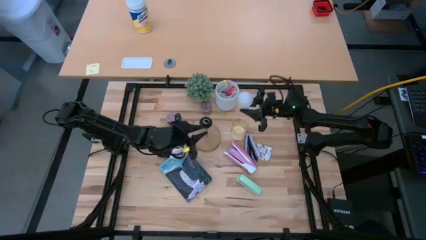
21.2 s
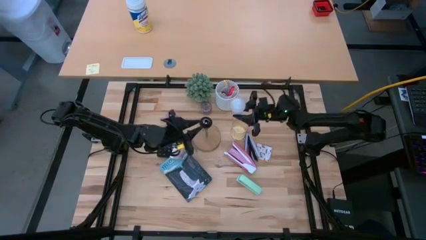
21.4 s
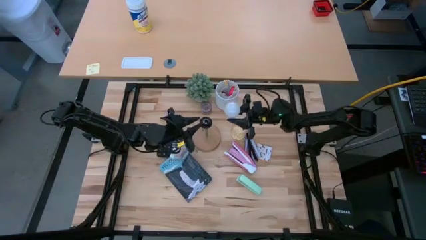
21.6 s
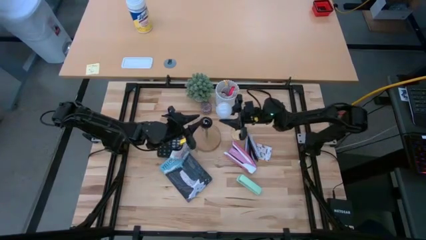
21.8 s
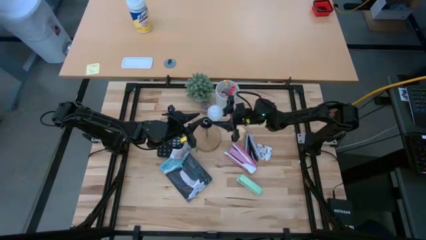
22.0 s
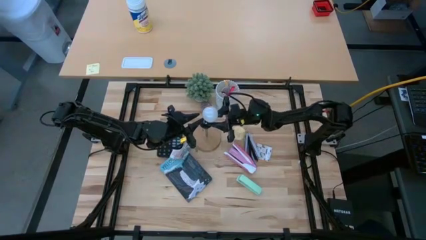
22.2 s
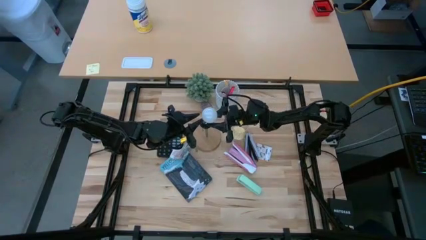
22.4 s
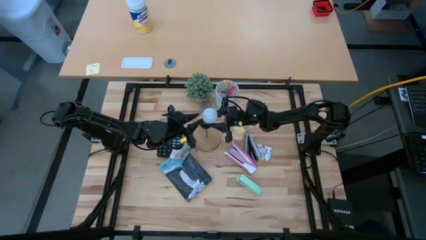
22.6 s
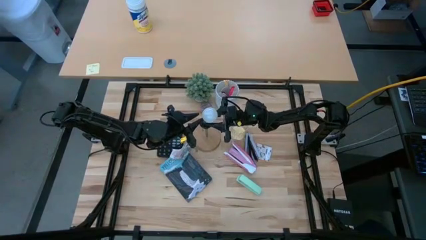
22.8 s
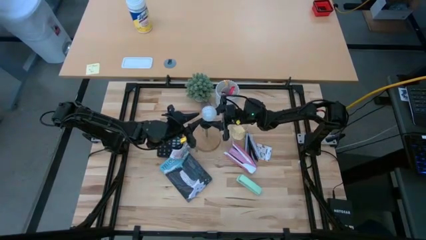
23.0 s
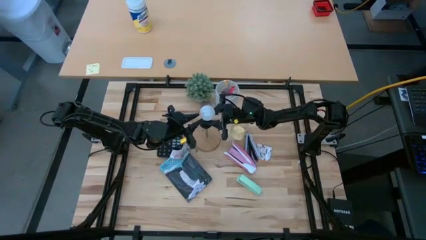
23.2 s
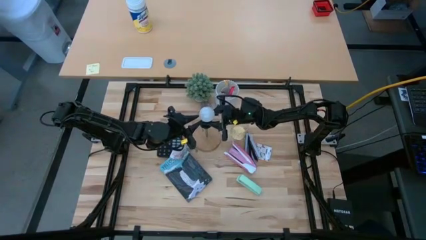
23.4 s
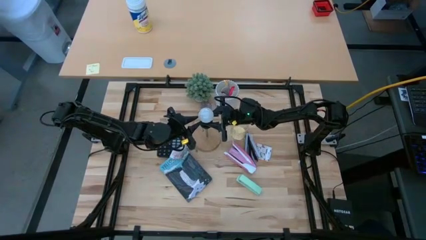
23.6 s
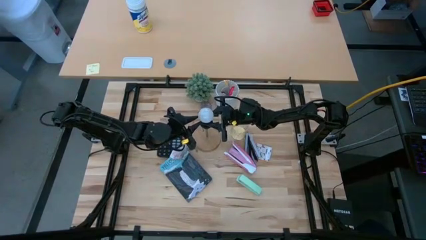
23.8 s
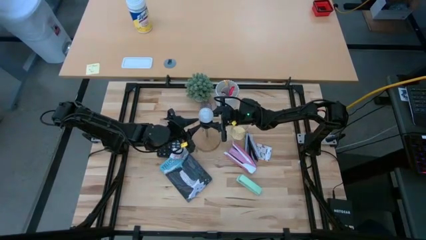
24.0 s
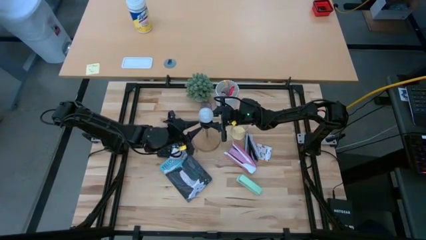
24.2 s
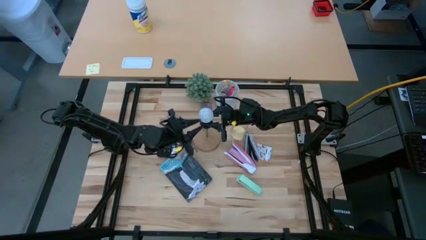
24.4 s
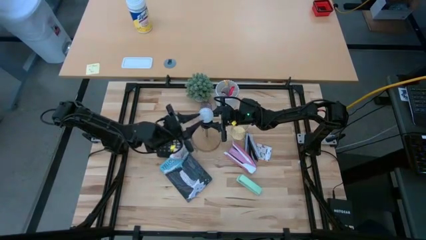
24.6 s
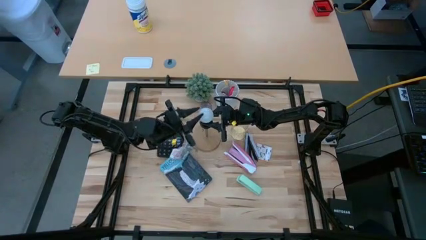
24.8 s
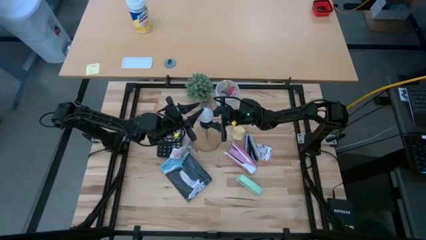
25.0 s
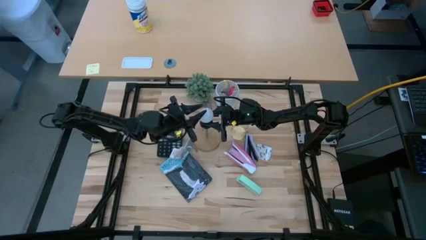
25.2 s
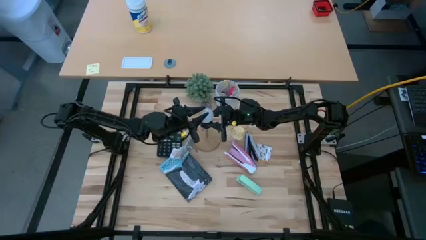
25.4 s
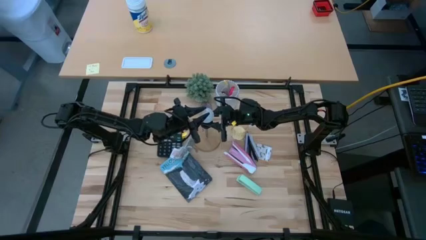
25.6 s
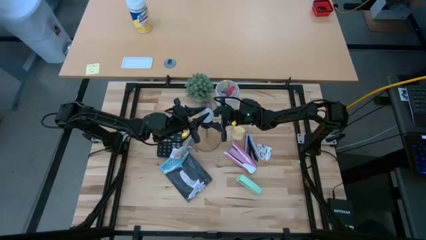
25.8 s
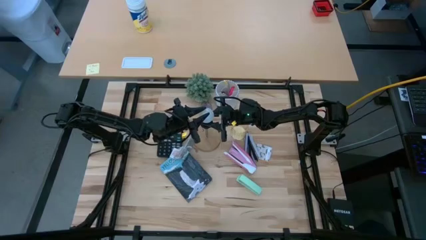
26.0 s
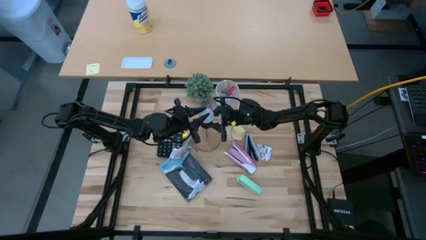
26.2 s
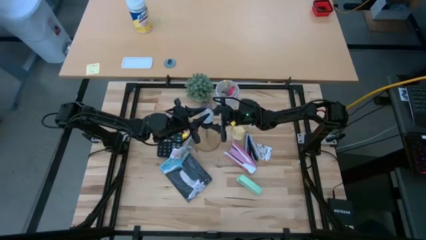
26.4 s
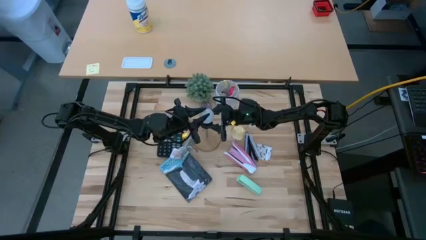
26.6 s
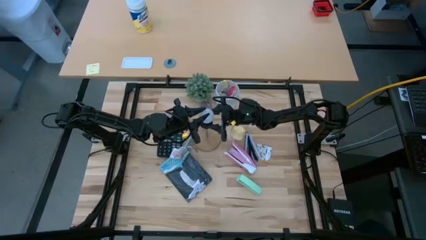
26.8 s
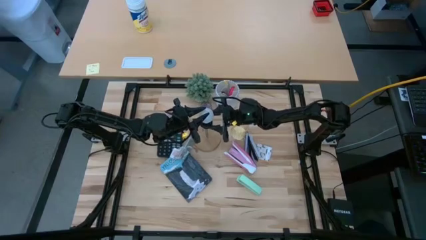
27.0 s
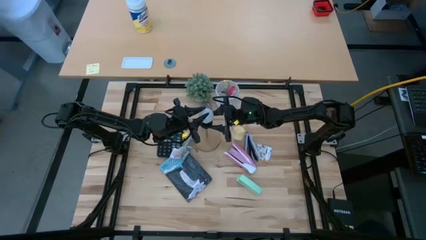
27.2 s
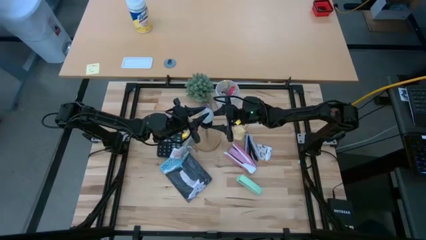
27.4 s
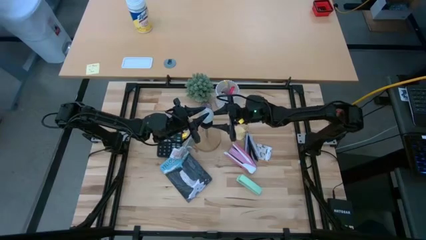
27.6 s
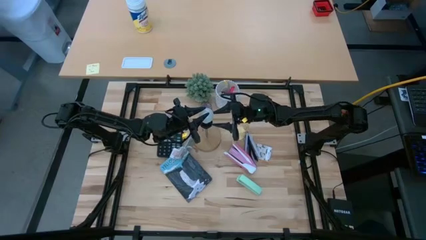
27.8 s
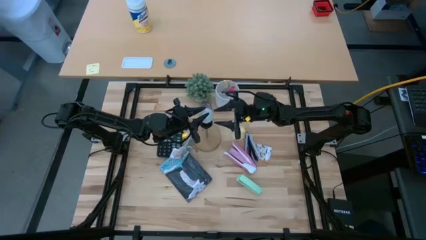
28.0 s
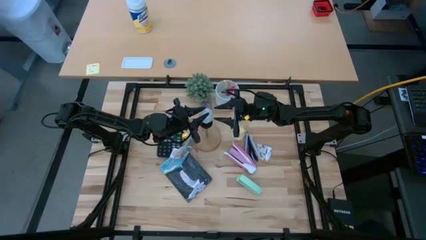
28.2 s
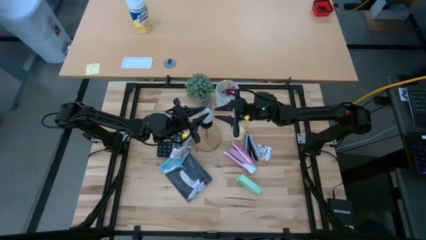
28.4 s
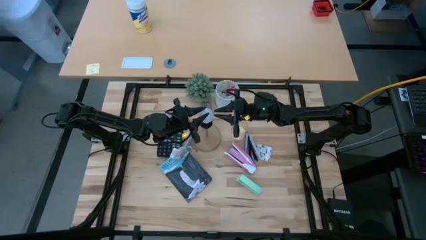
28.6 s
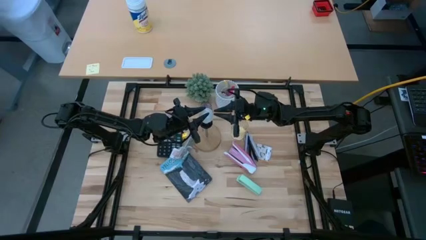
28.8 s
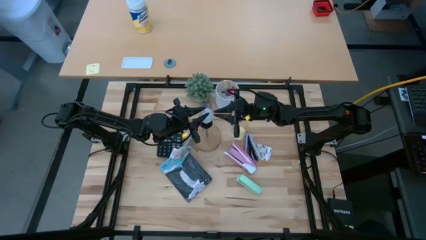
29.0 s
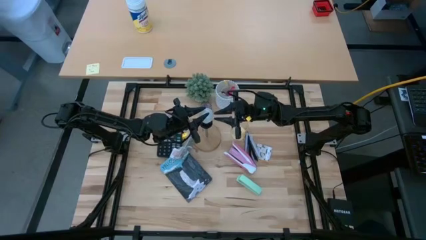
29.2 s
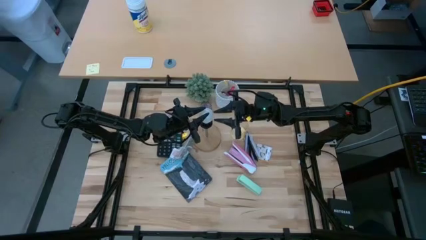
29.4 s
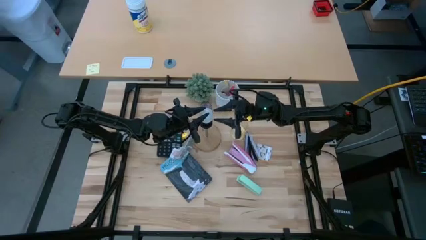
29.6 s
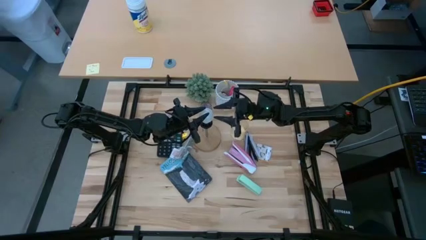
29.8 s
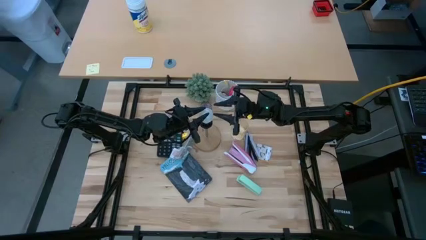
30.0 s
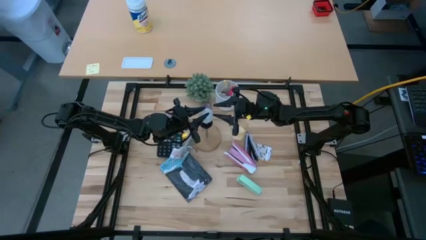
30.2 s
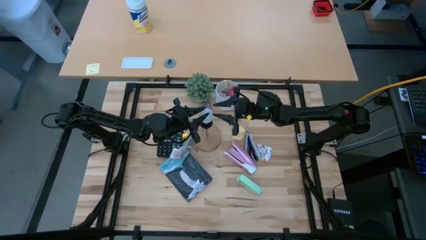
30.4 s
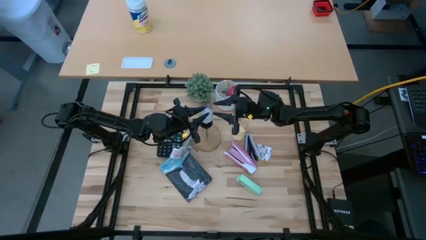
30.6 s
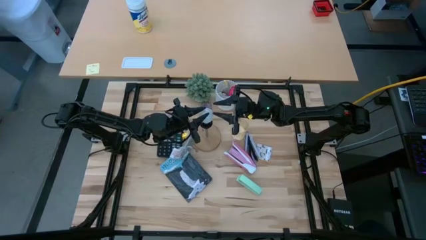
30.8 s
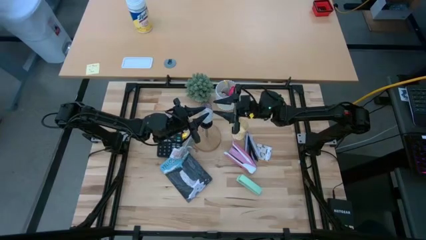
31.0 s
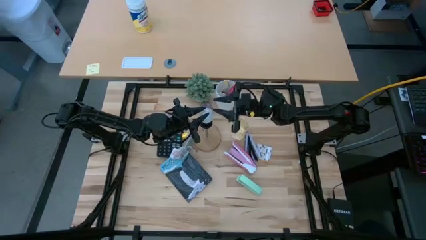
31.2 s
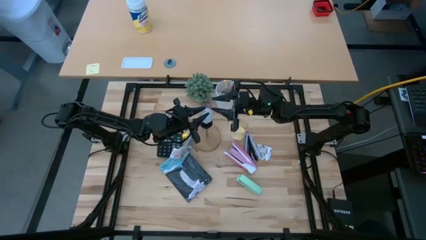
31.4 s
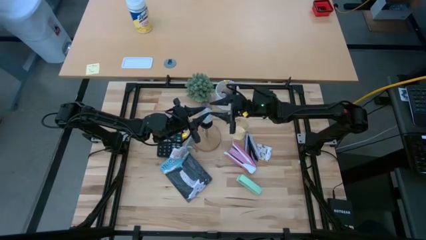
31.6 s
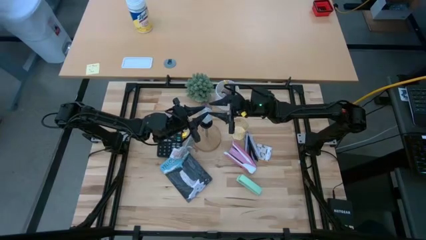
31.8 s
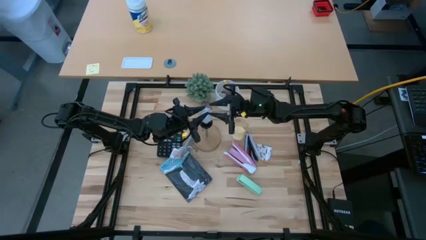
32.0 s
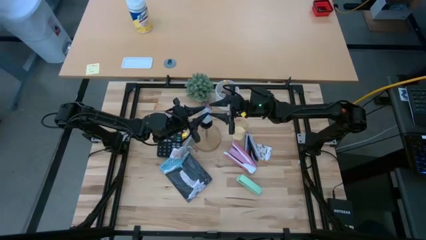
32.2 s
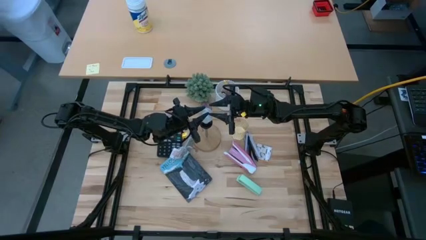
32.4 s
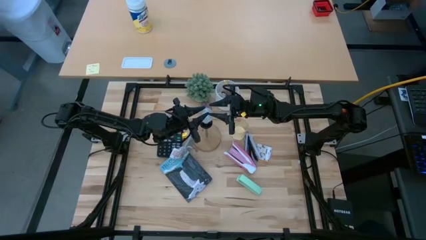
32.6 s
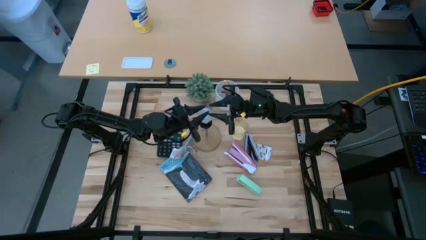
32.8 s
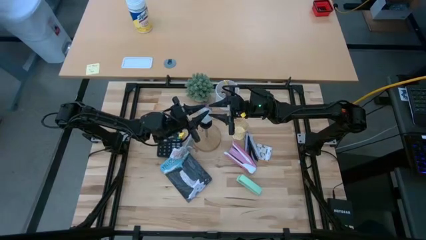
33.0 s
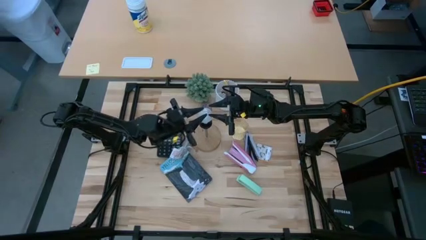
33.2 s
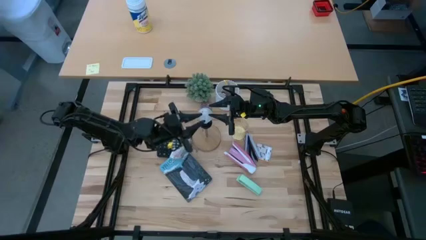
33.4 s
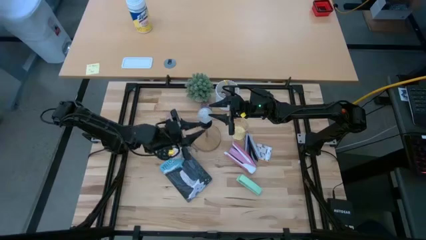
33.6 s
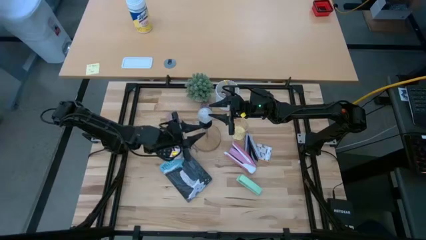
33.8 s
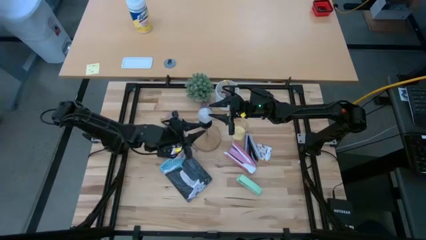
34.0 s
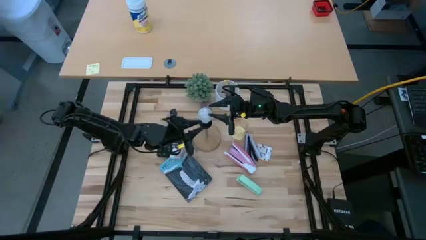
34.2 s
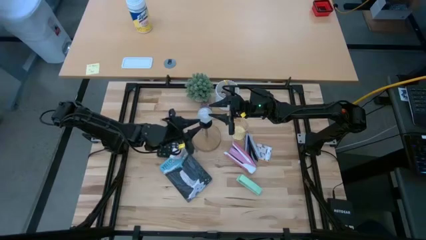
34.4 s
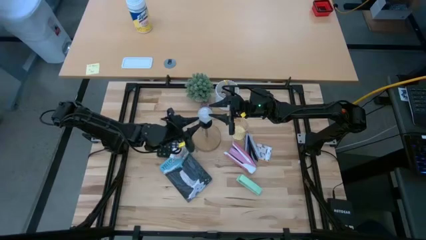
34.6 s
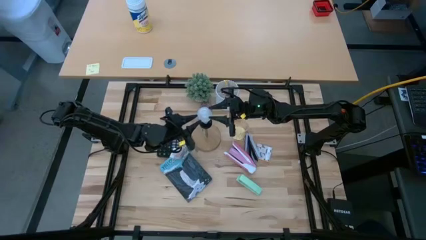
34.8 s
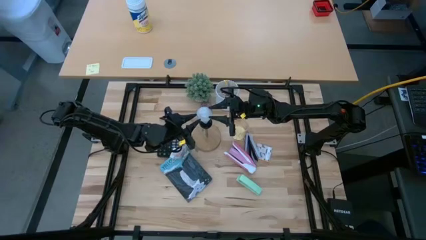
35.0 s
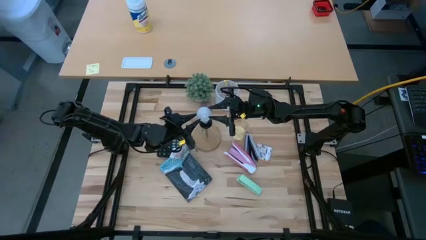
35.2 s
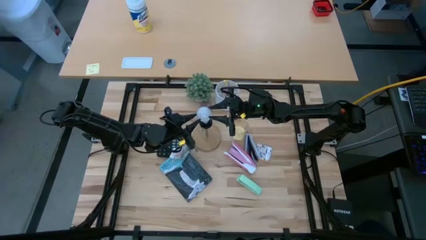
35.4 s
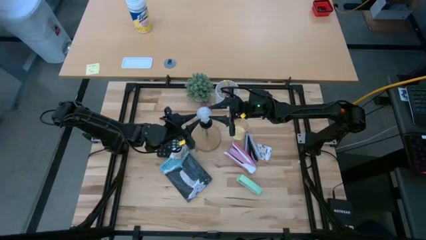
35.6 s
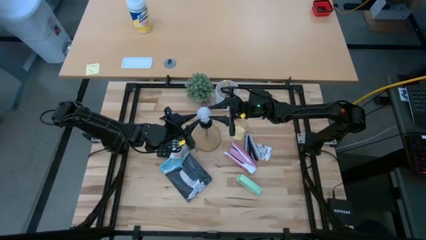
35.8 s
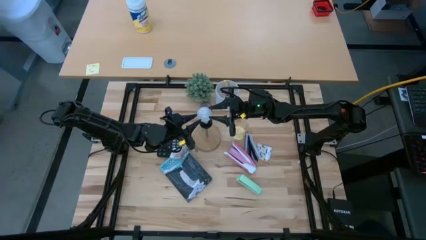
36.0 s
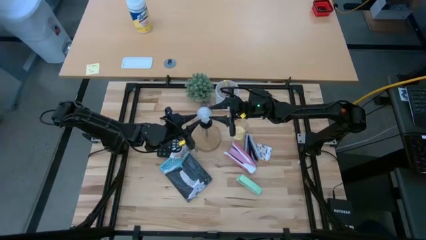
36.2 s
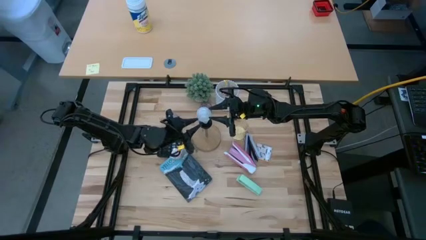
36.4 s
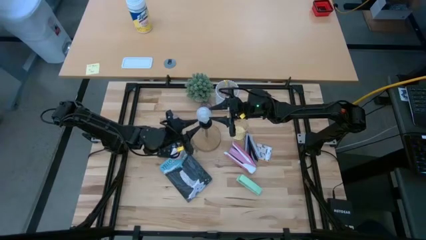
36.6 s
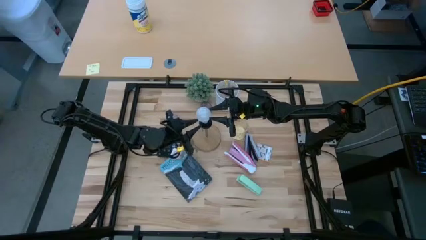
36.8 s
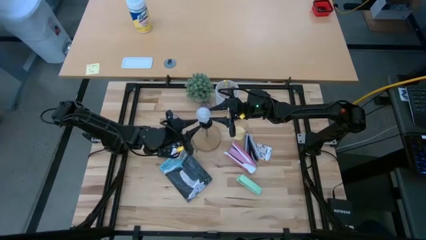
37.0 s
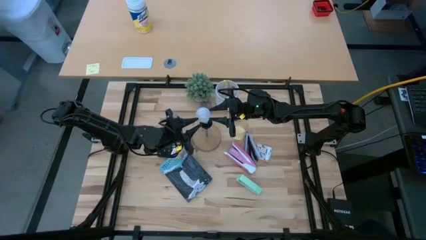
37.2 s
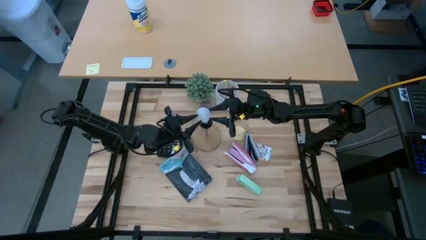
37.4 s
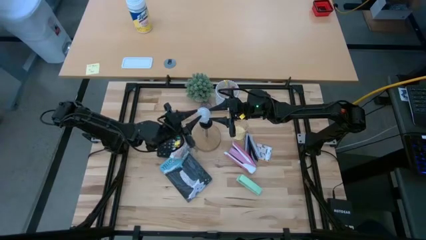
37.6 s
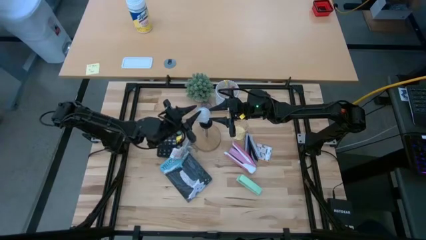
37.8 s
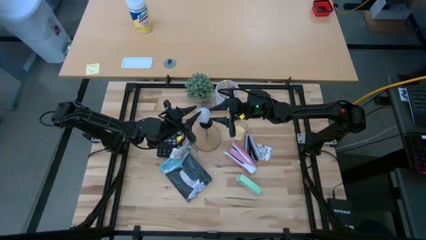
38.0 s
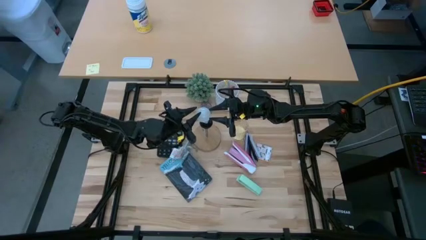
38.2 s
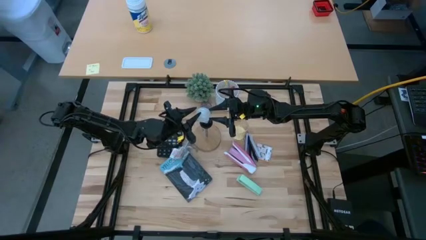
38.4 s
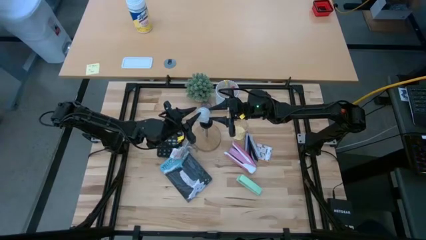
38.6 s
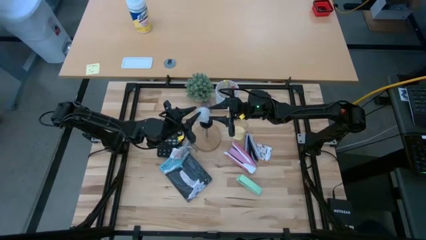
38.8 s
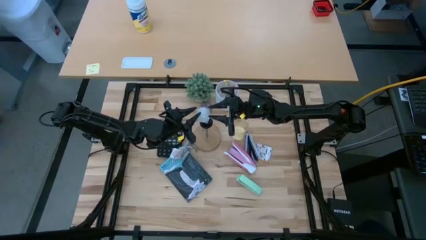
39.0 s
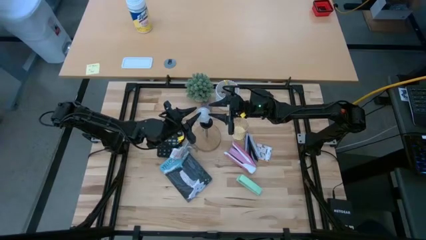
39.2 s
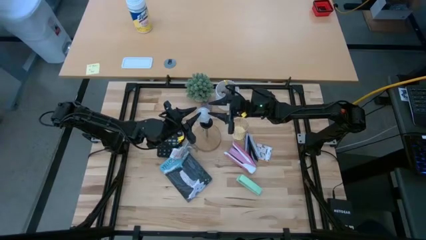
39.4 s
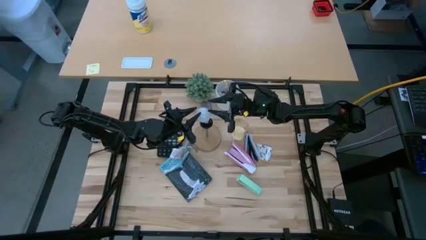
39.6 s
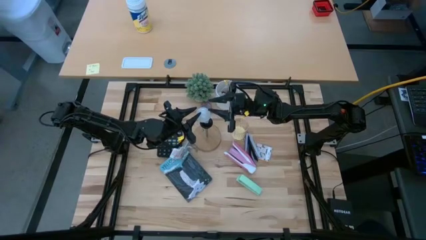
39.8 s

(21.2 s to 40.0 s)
Task: Screw lightbulb
Insert the lightbulb into the lamp
